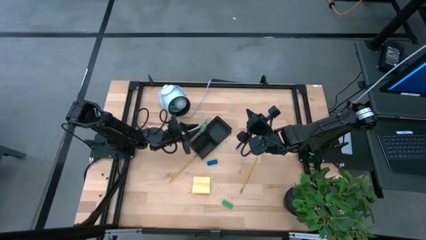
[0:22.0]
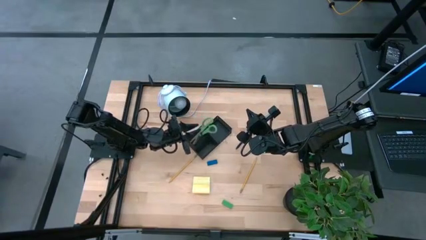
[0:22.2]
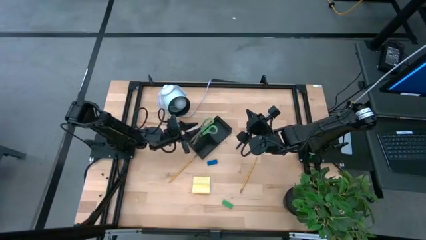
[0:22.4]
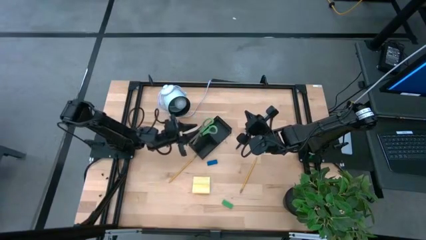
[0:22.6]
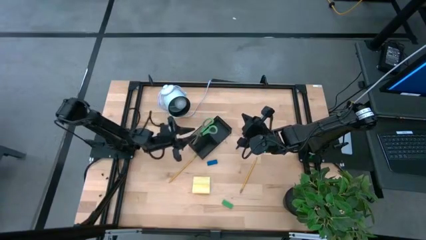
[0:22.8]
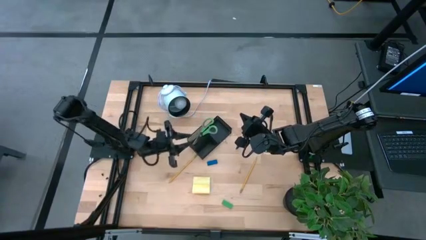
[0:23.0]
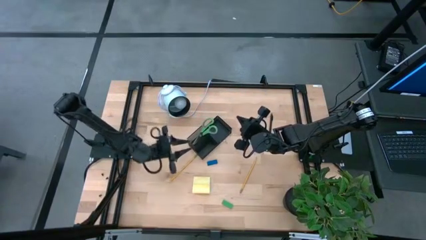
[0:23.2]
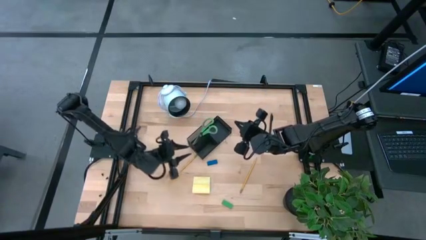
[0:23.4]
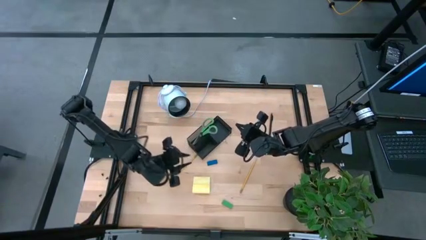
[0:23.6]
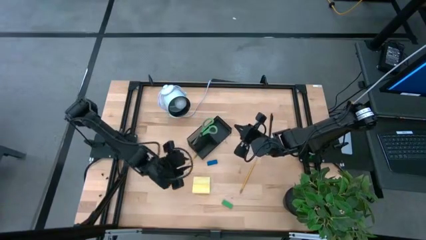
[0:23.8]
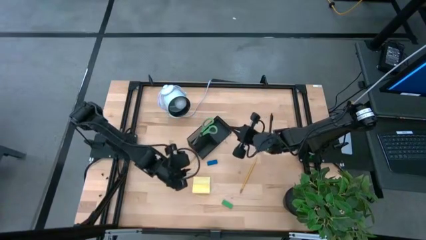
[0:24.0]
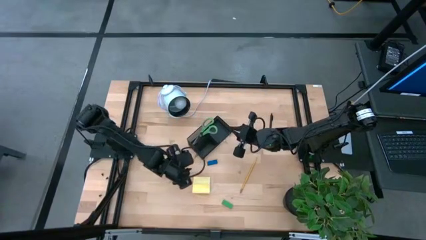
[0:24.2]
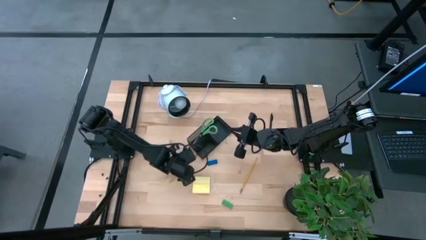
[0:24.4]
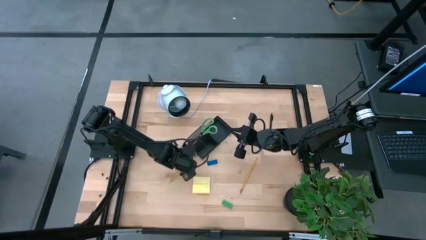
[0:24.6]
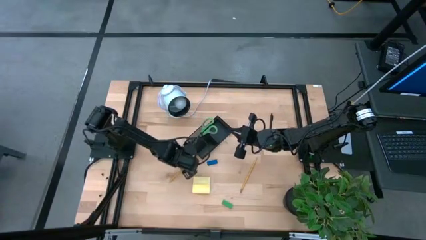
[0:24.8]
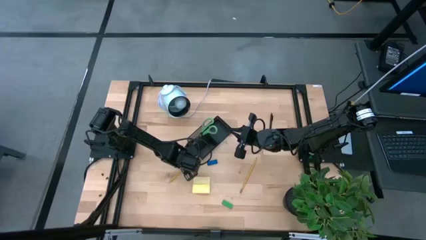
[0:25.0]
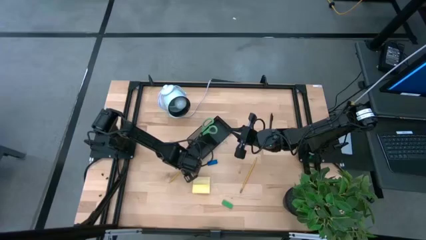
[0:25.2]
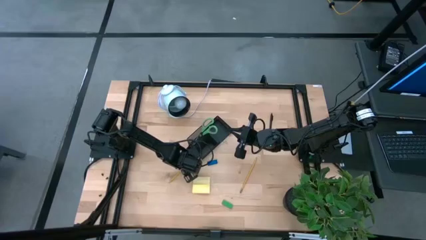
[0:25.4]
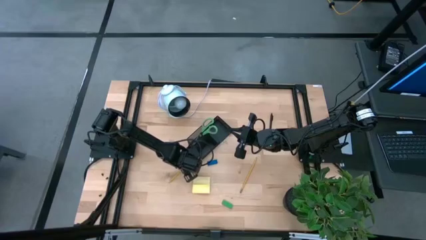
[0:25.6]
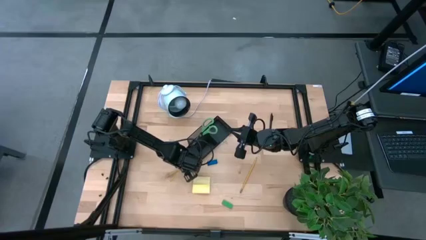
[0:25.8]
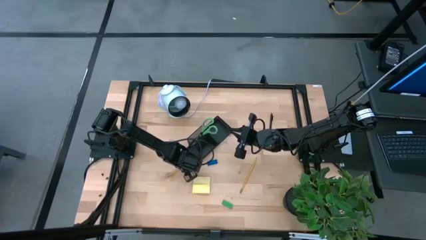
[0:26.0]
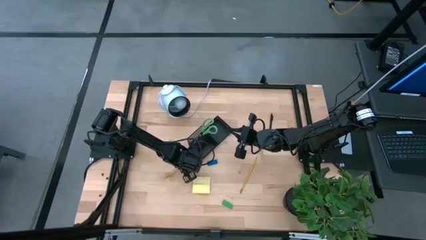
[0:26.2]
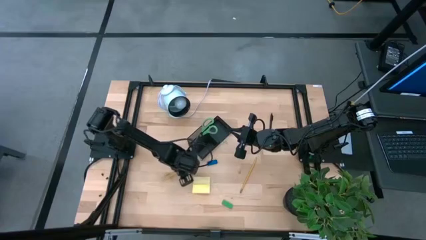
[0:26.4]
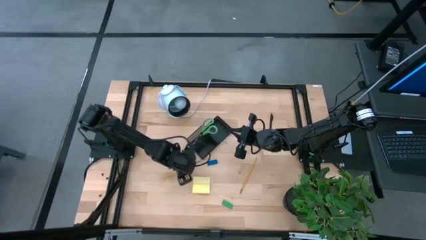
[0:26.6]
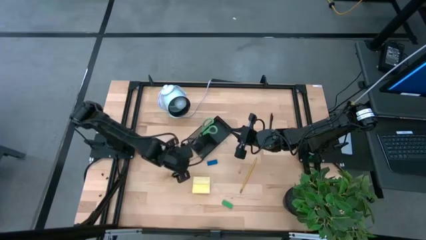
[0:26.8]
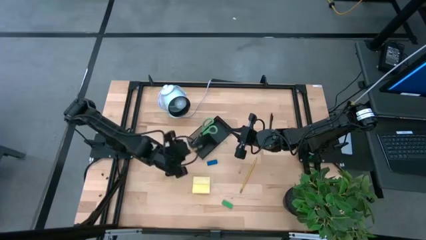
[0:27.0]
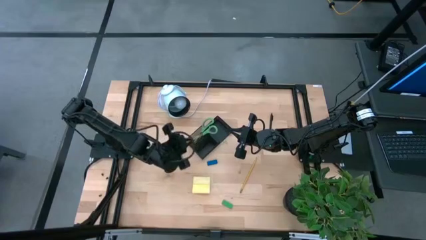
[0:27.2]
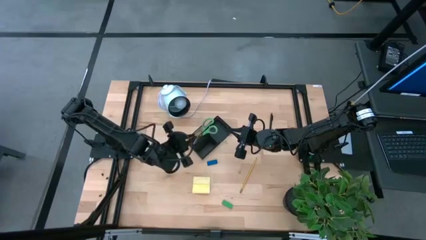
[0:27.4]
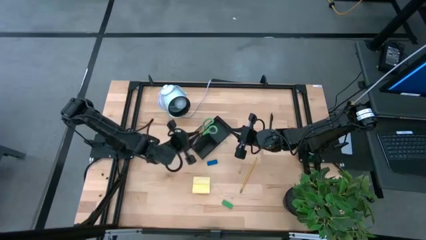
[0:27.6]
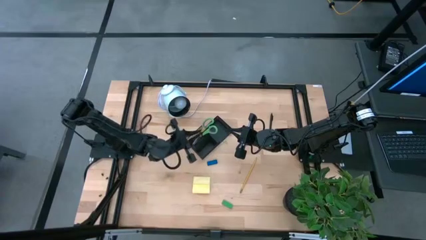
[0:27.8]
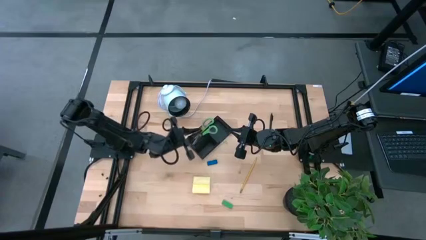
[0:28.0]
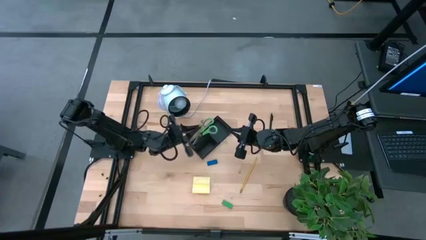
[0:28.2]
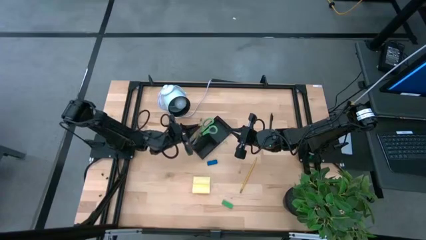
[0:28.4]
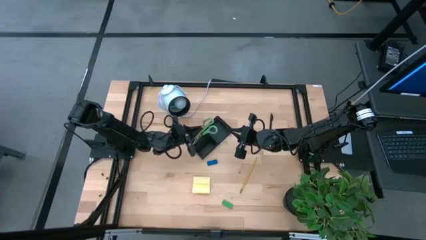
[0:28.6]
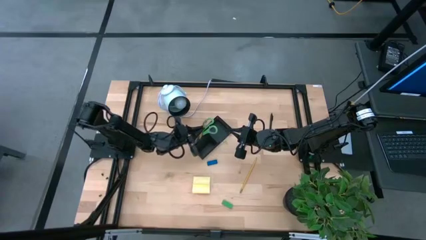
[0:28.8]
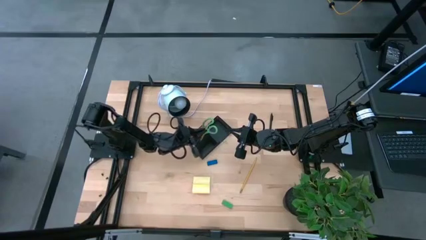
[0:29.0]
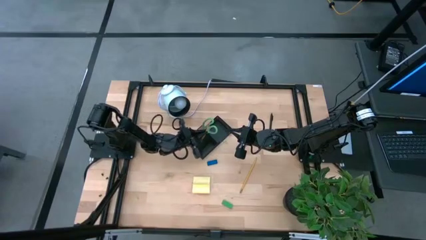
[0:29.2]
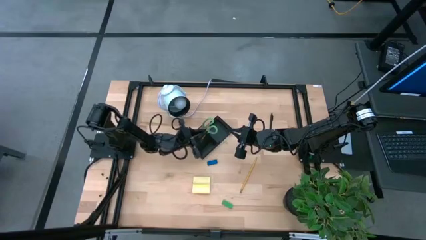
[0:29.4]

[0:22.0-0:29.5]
Task: Pick and place office supplies into organizer
Put the yellow pencil into the black desk organizer

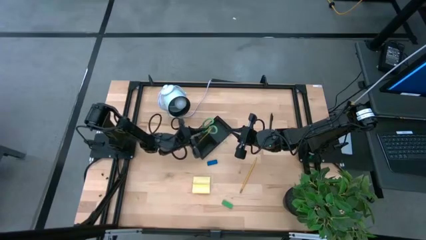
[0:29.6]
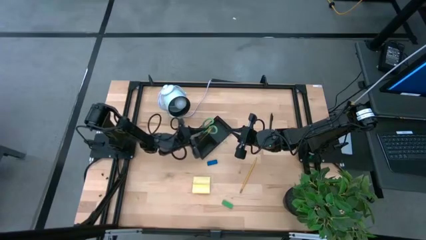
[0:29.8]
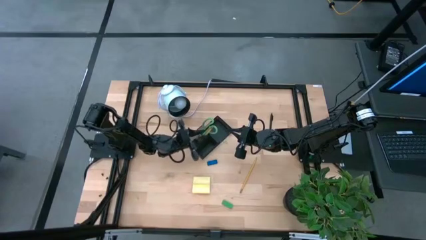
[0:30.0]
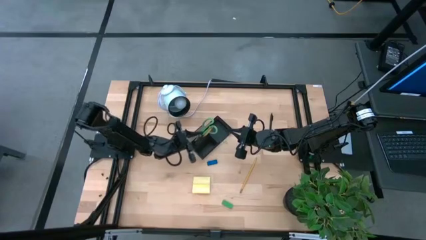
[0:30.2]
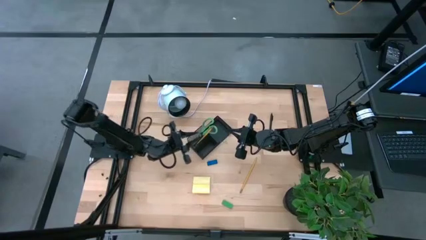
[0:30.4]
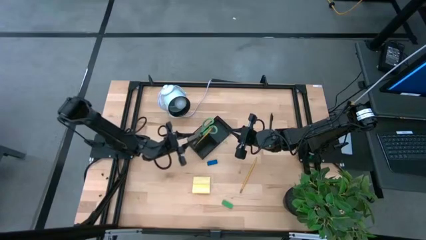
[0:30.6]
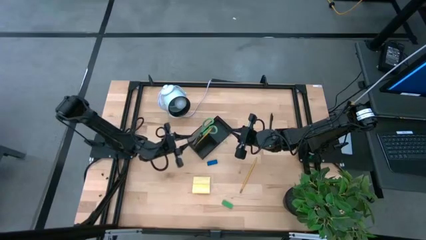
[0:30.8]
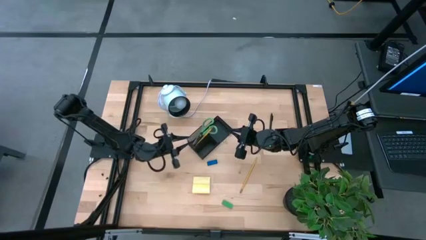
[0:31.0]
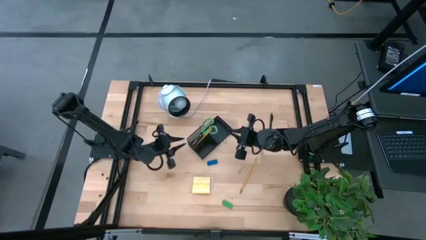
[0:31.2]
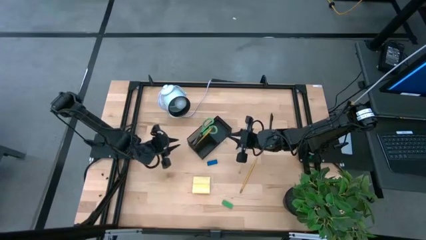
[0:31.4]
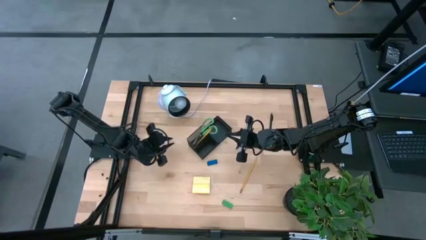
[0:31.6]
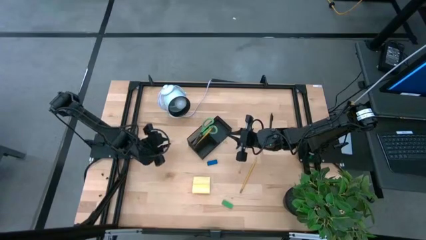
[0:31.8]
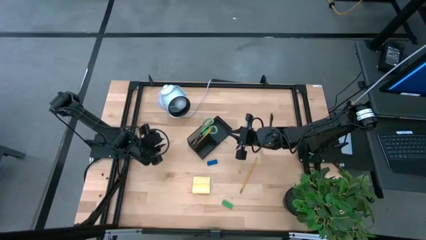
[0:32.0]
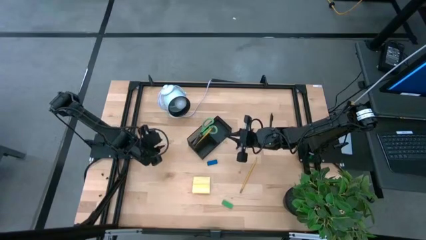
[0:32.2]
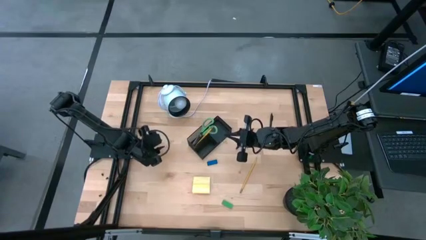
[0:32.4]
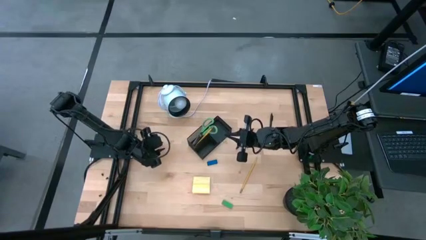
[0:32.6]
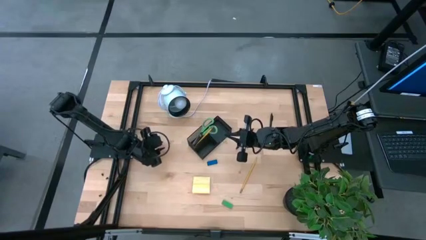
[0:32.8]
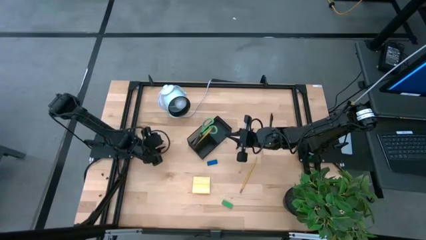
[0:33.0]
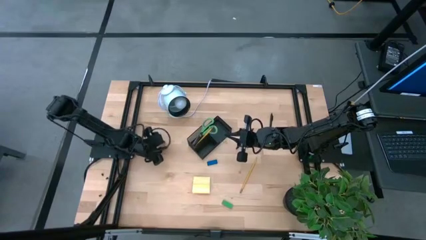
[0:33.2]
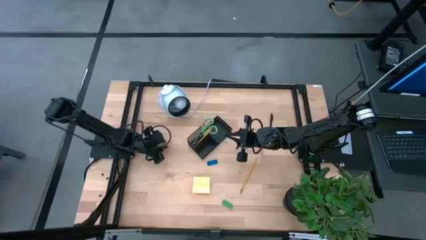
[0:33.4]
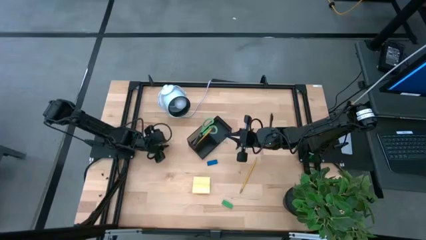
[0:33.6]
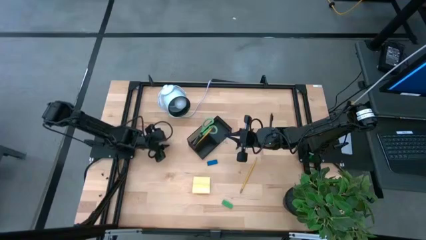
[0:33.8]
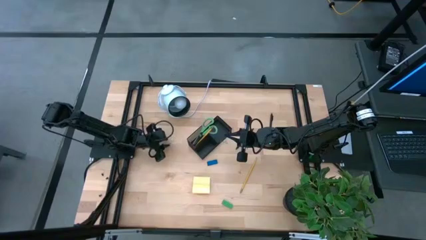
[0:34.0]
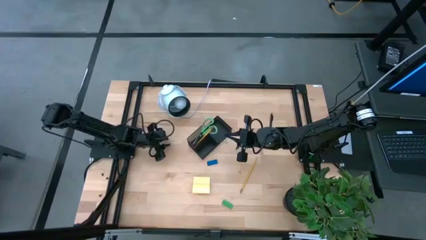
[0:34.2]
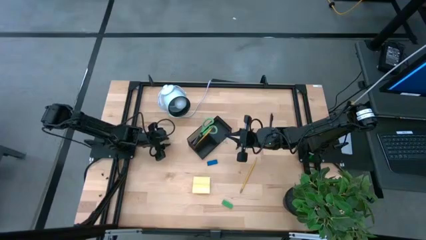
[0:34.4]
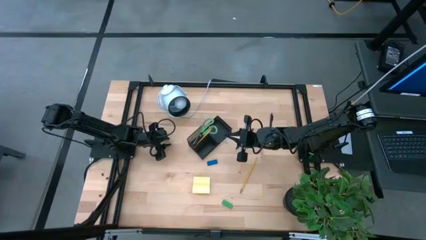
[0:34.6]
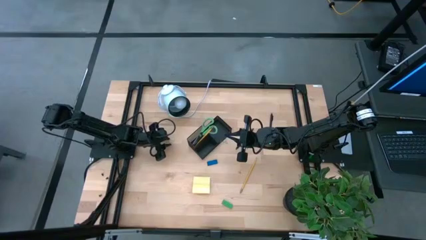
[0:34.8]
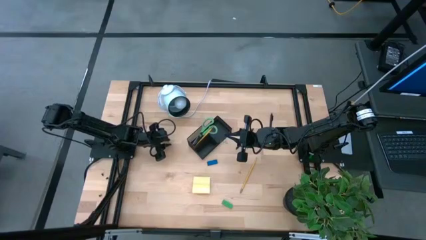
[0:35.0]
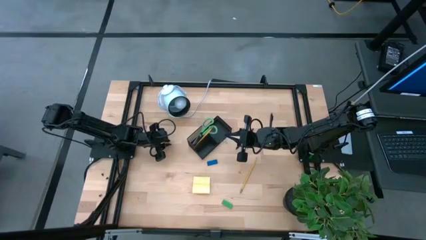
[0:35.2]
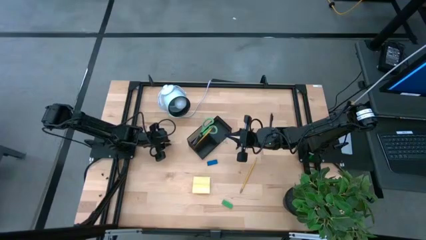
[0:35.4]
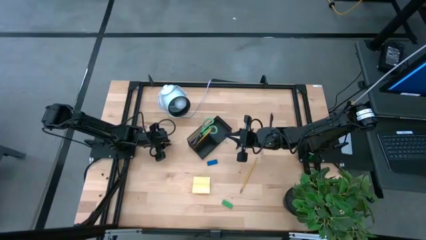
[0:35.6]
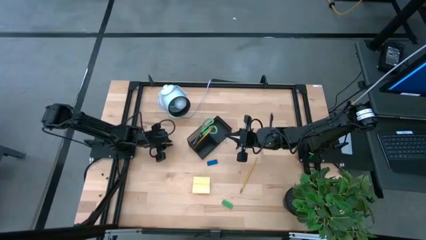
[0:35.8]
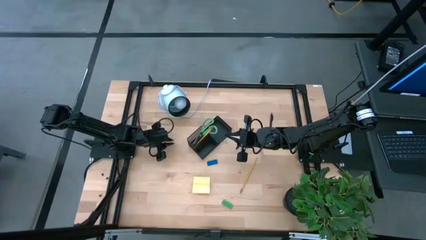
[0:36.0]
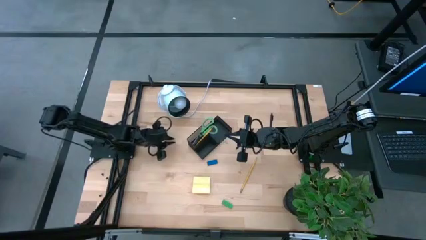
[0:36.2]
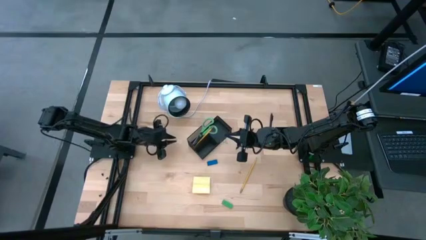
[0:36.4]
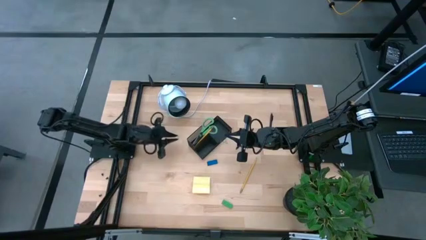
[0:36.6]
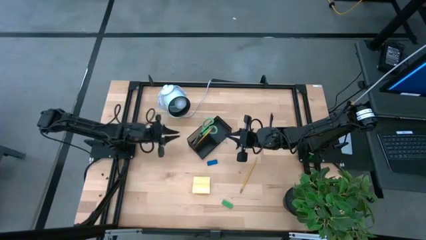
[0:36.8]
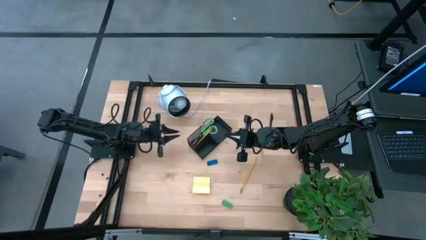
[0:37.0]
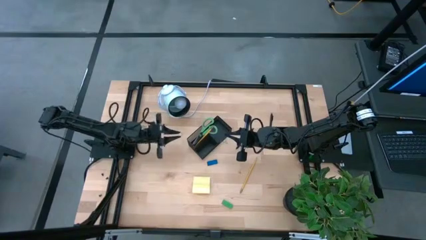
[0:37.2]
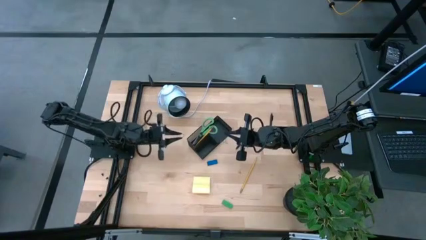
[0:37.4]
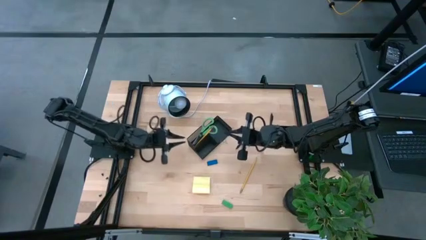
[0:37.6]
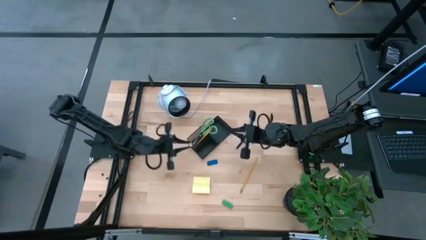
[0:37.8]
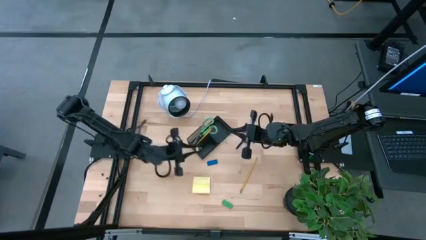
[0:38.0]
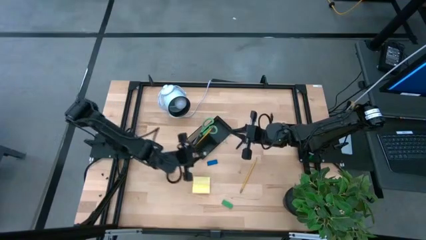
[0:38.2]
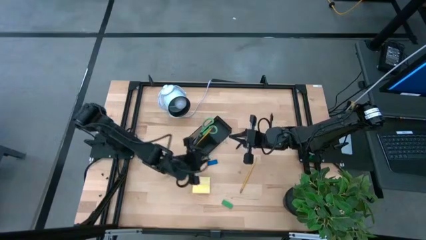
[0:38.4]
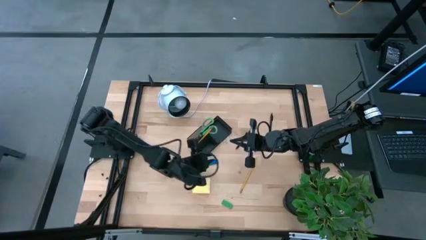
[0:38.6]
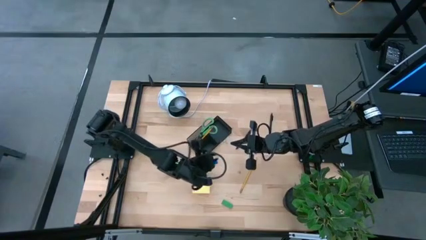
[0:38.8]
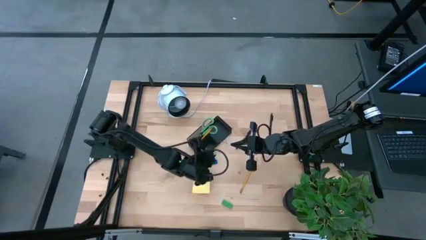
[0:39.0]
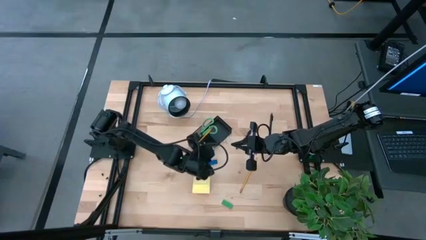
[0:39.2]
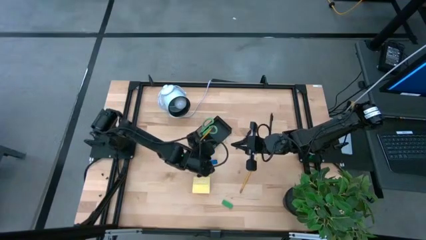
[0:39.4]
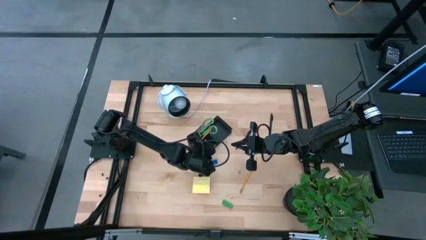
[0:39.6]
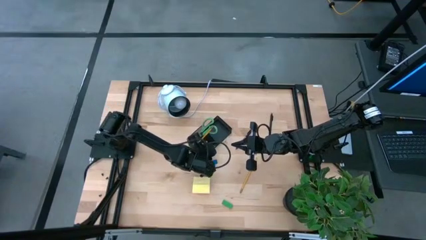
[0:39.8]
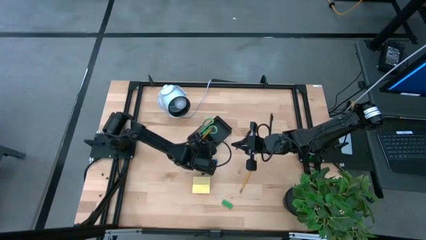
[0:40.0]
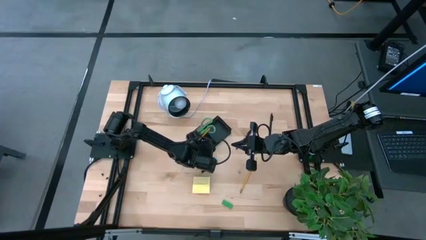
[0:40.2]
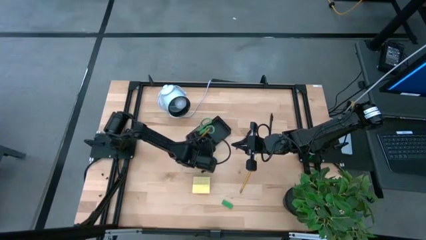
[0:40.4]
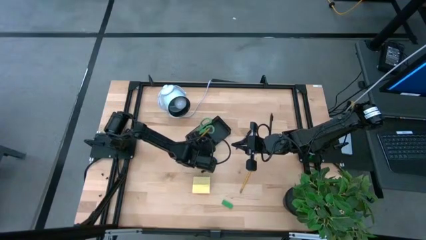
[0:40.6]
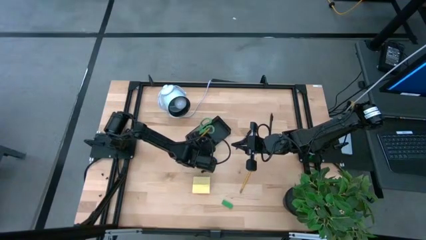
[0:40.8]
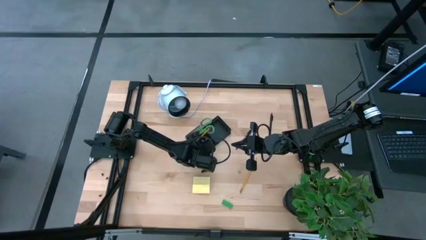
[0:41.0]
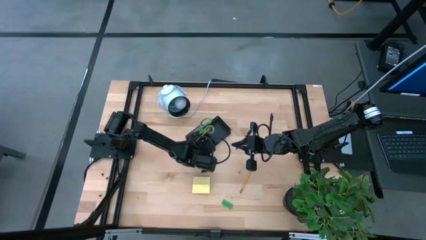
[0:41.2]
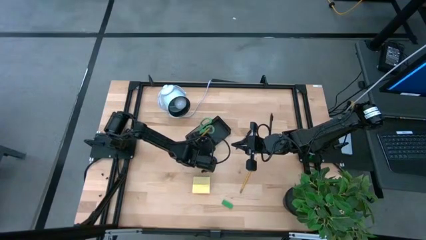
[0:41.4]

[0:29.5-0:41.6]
Put the gold binder clip into the black desk organizer
